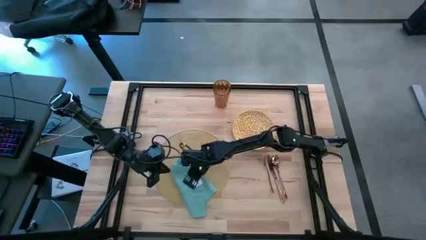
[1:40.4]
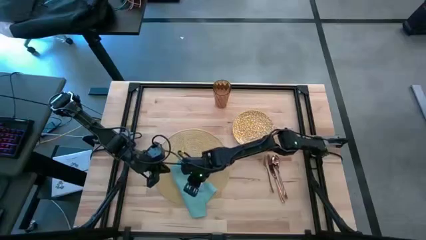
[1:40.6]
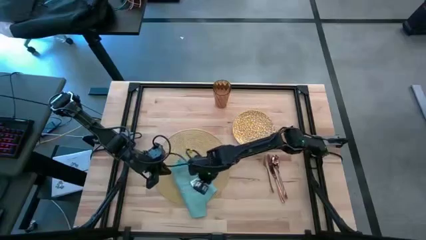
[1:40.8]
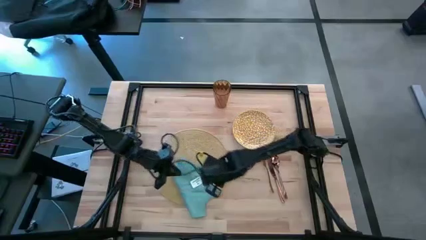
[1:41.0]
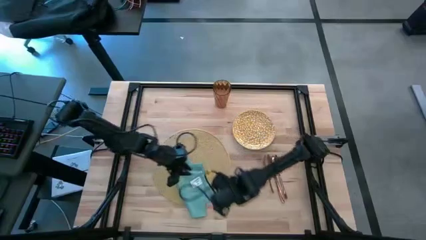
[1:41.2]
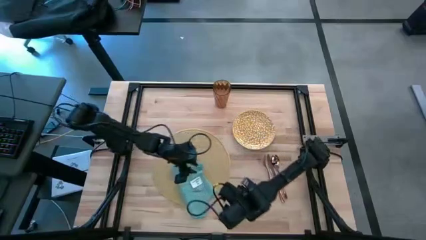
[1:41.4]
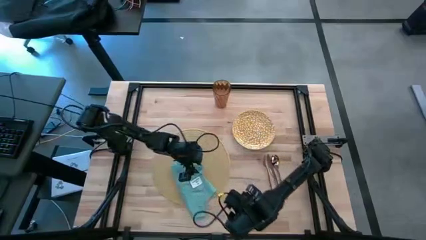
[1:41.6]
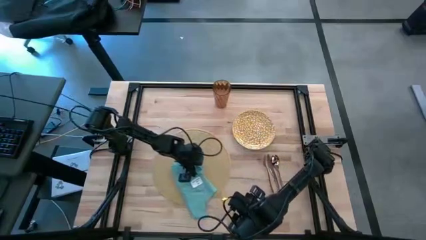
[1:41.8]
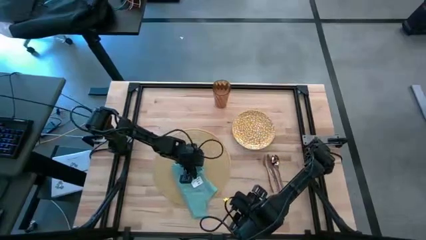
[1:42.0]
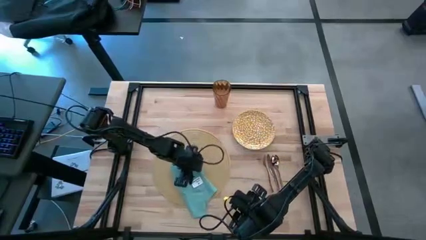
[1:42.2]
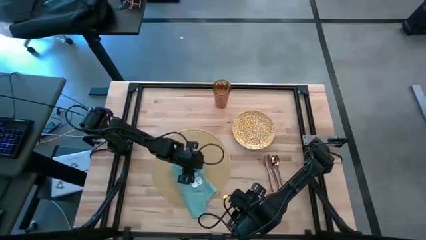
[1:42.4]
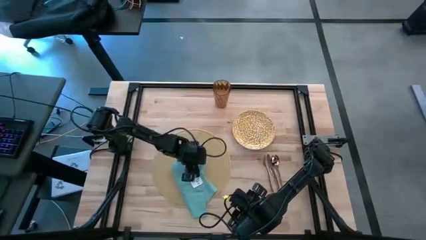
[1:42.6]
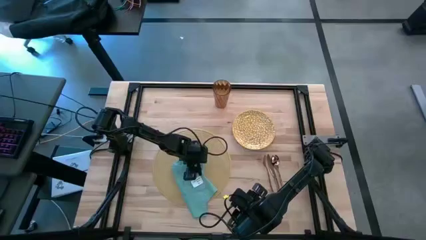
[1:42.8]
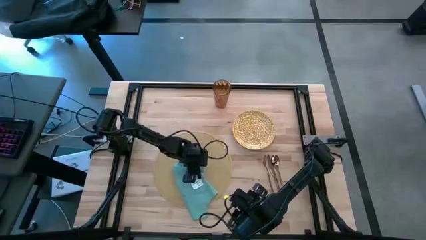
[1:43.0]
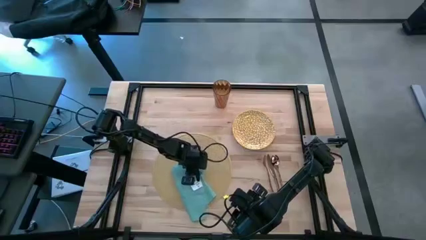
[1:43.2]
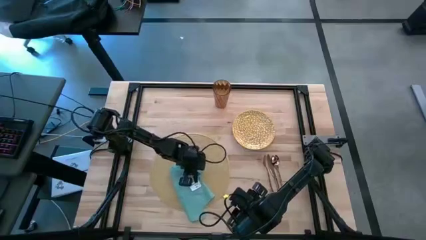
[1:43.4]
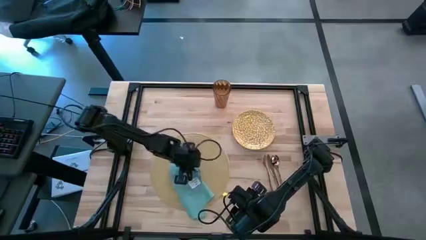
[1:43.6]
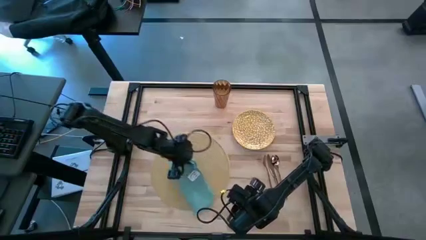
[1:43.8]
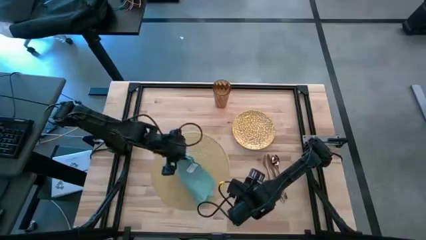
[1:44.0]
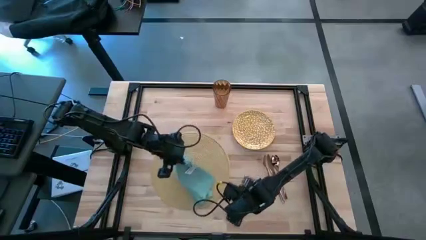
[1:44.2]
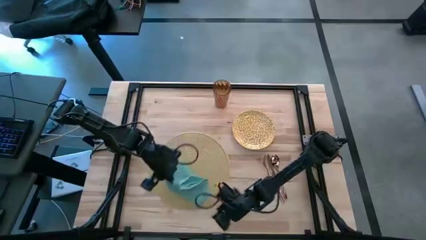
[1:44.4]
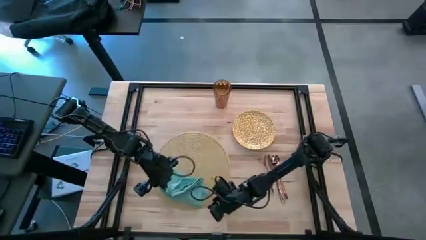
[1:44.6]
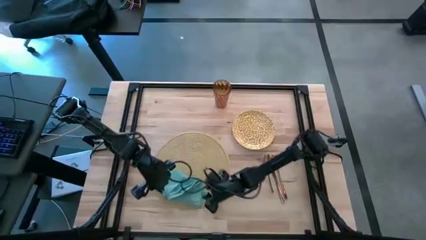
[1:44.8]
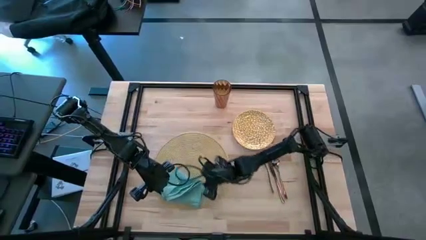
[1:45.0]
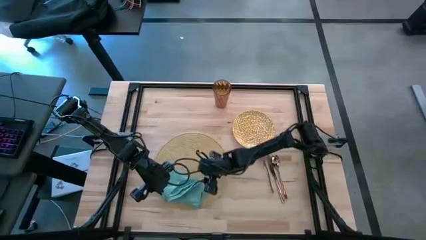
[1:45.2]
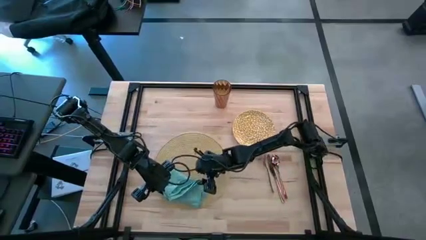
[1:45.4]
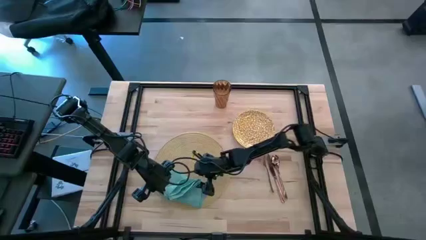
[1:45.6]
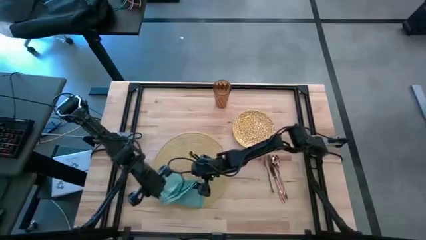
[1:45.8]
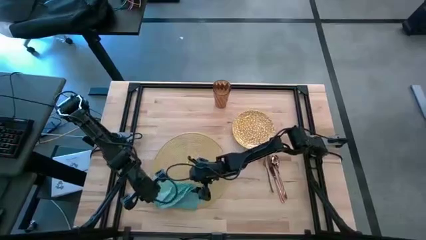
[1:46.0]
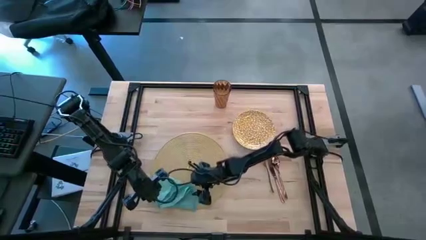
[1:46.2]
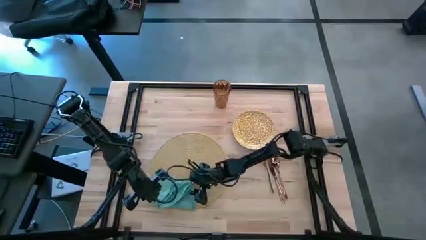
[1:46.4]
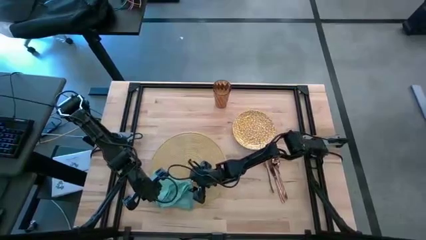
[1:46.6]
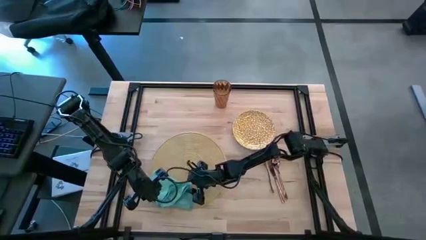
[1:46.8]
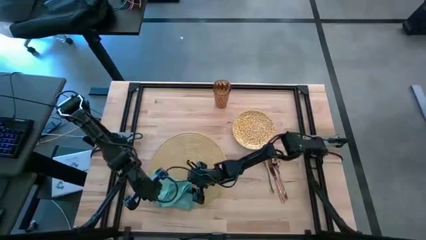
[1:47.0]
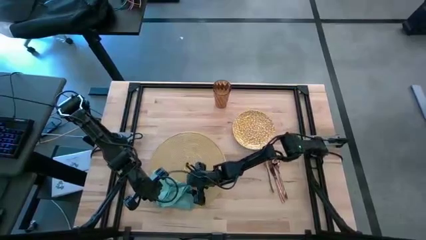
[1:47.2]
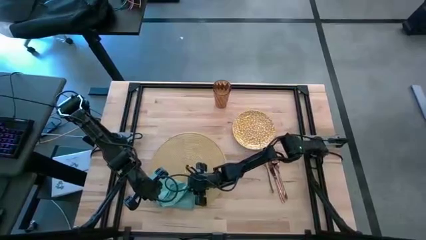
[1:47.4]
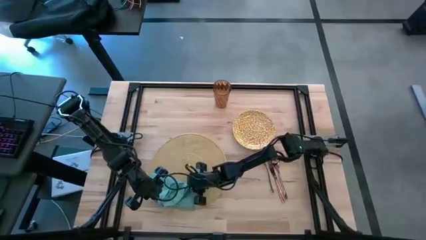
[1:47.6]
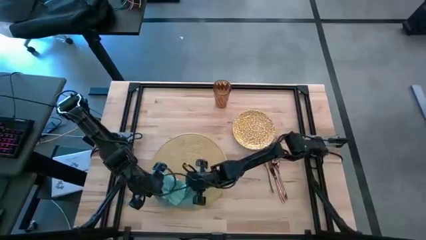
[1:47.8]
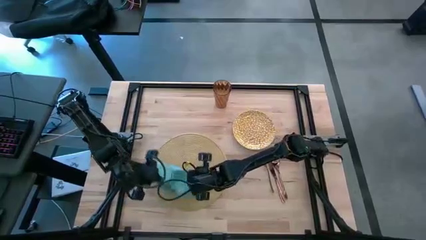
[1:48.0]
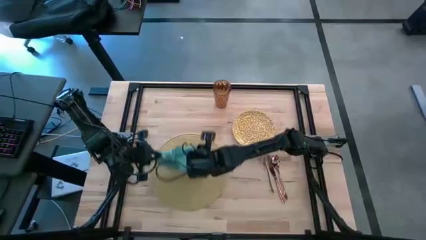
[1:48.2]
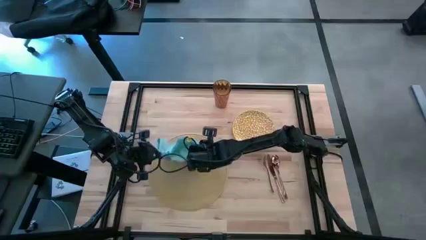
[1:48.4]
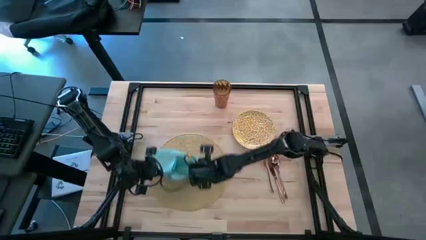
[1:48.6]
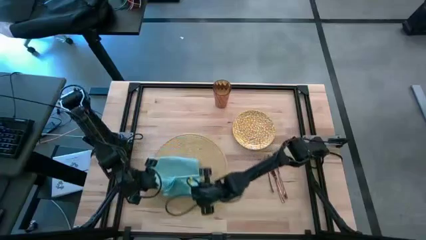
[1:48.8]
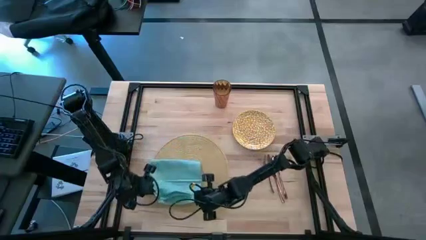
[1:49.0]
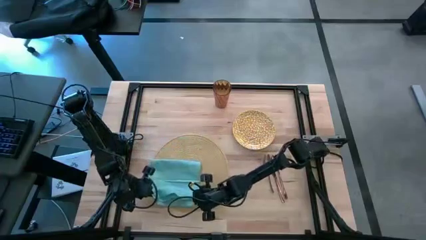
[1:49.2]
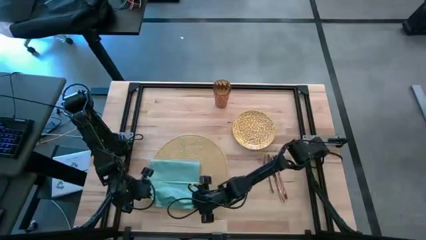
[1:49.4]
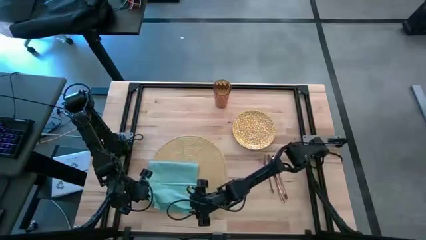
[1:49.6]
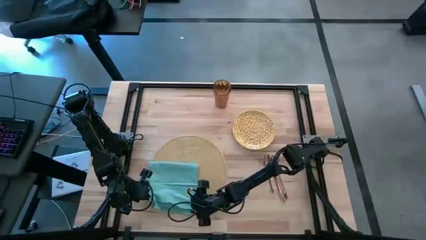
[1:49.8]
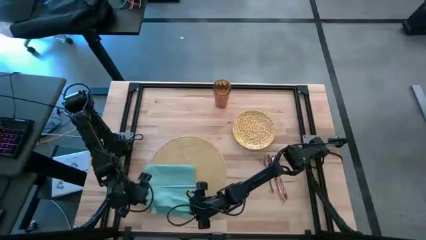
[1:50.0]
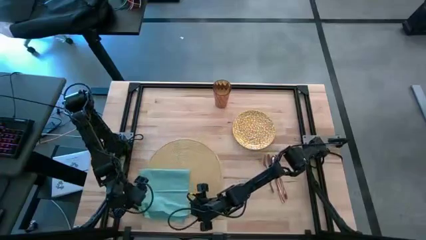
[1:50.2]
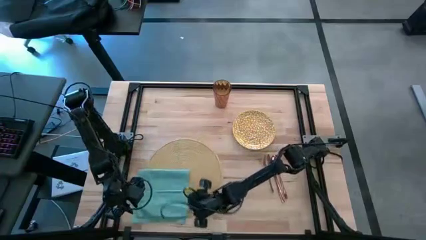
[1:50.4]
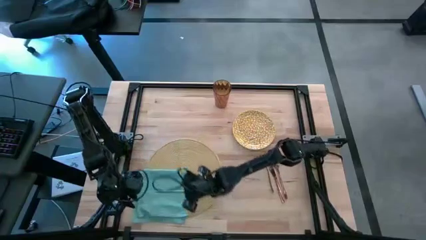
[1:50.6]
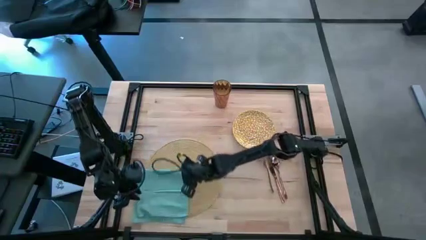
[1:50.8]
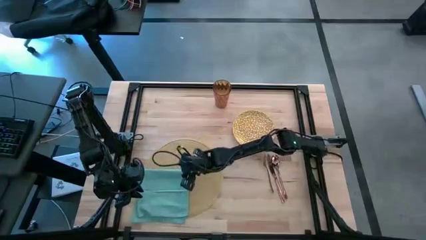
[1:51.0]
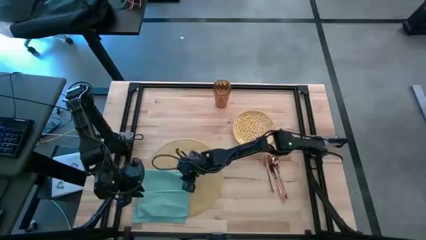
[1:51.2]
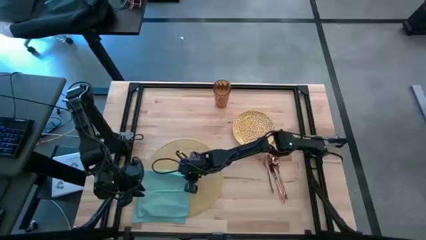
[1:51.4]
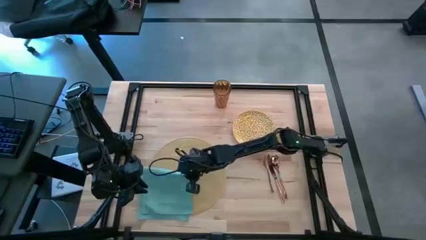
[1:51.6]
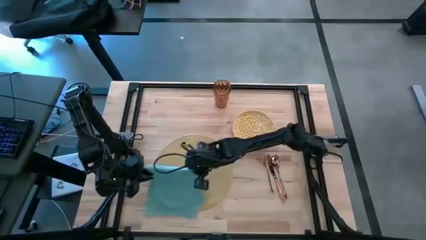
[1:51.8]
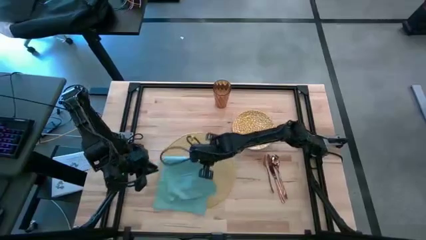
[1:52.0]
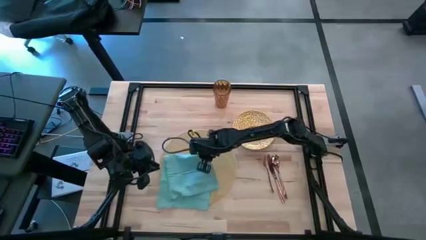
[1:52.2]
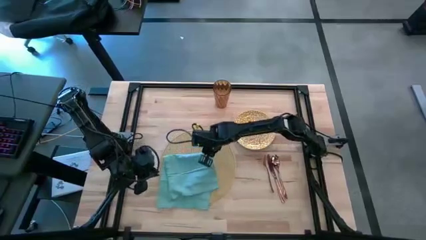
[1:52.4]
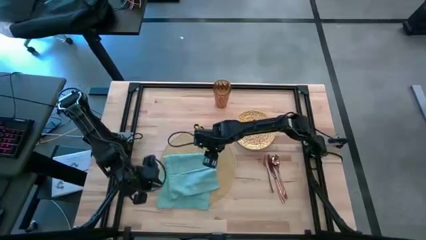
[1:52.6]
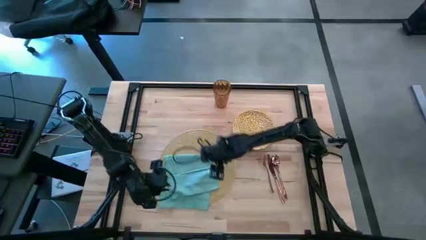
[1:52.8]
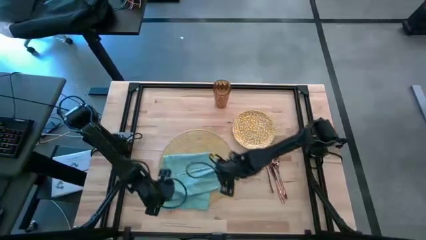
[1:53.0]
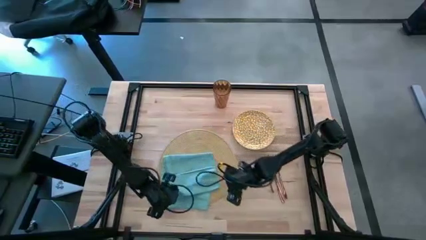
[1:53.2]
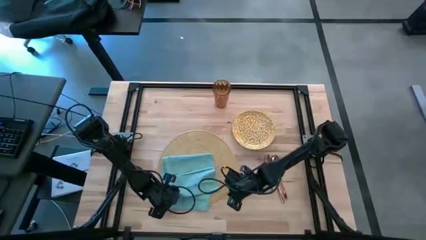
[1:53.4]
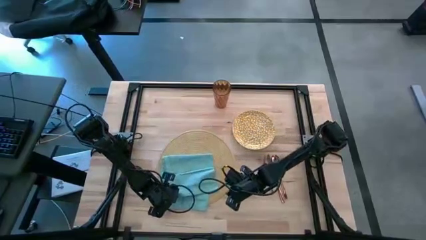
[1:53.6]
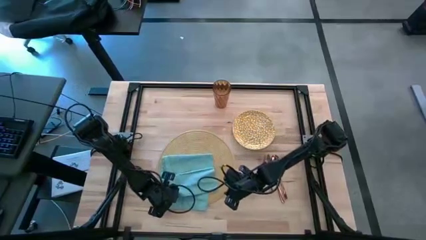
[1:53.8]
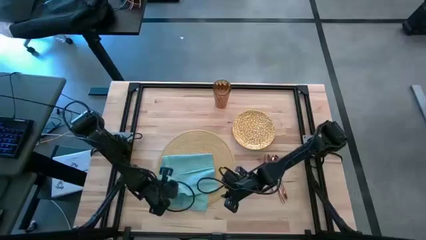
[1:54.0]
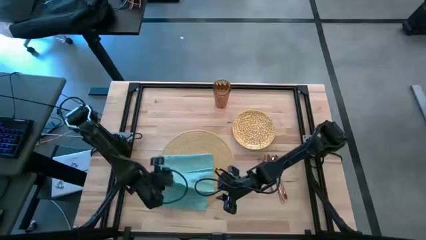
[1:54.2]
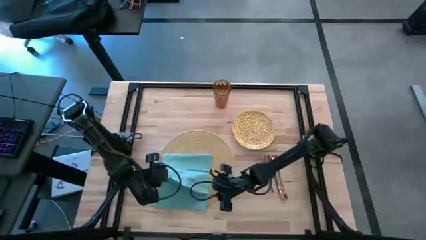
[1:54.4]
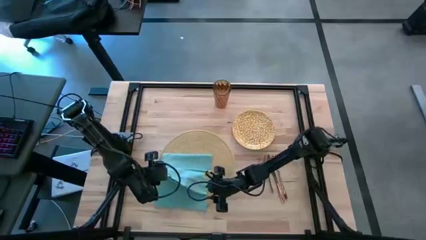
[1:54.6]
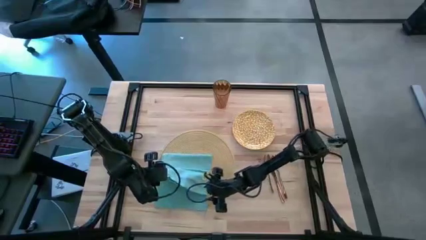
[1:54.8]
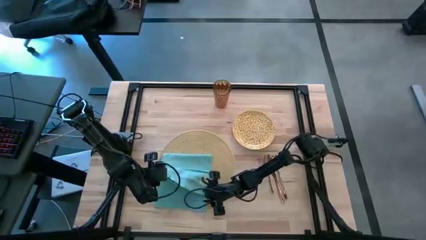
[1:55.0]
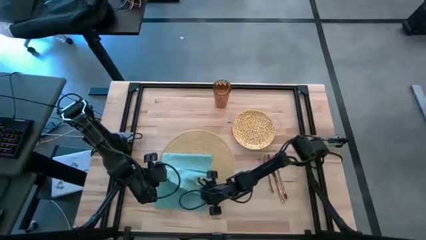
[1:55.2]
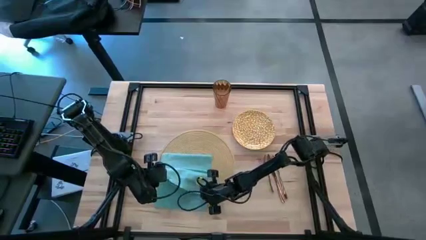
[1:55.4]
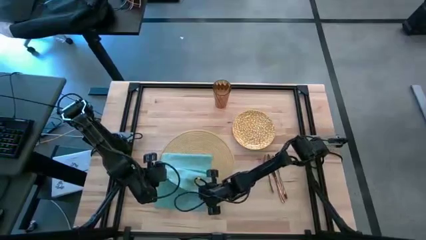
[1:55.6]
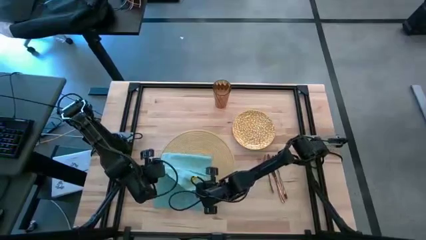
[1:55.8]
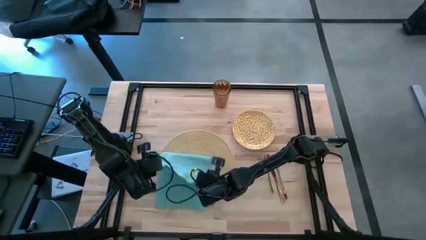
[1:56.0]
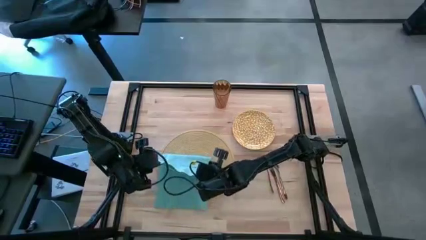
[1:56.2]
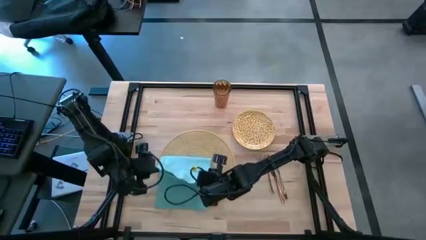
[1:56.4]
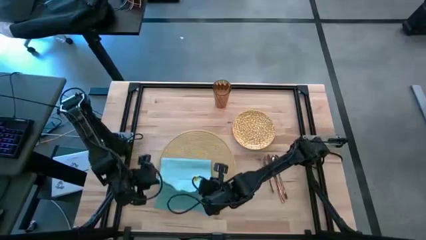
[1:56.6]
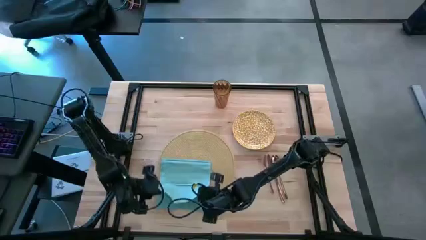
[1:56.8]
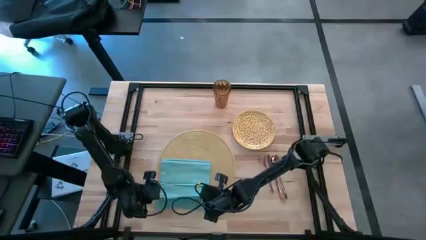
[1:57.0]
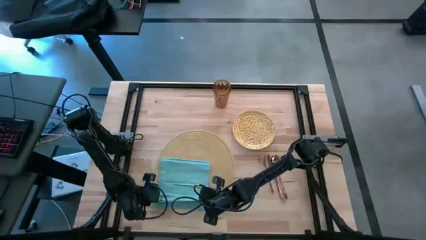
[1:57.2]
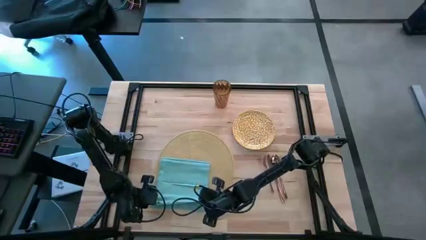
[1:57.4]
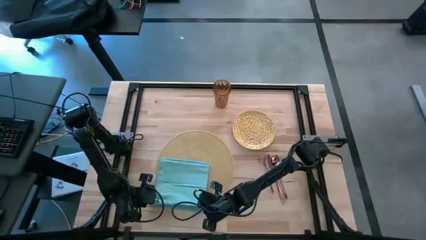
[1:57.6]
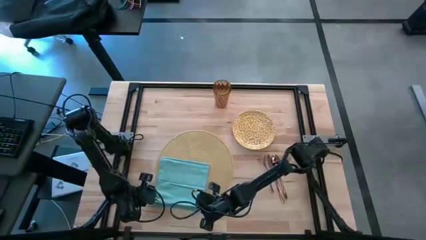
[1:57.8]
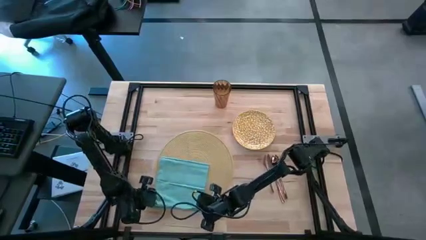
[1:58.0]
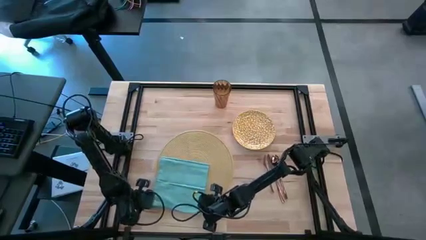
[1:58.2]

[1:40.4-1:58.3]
Task: Set table place
Fold the blue table napkin
